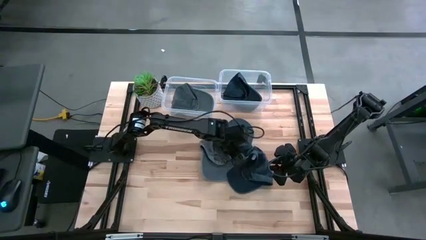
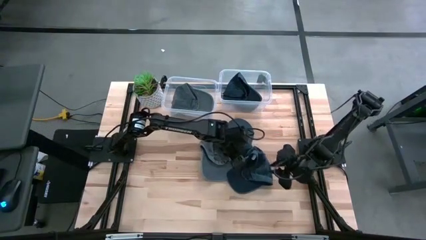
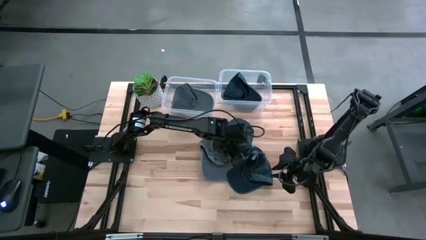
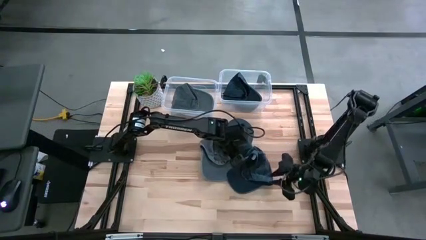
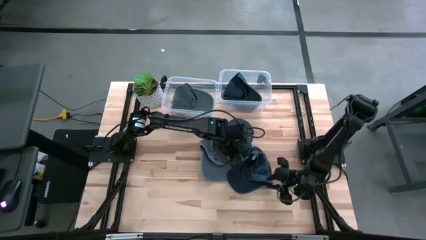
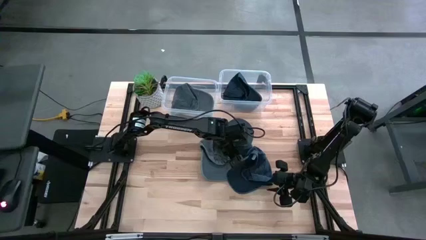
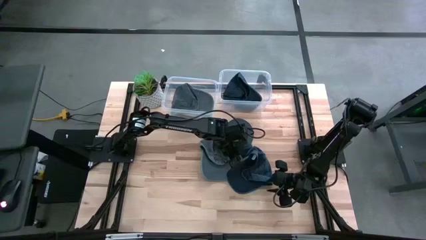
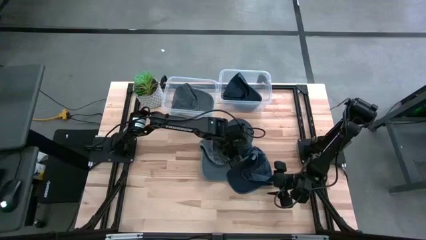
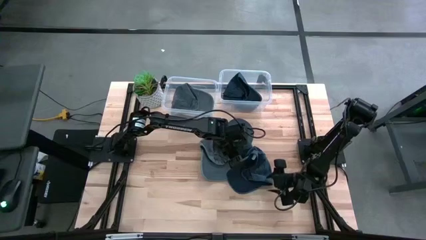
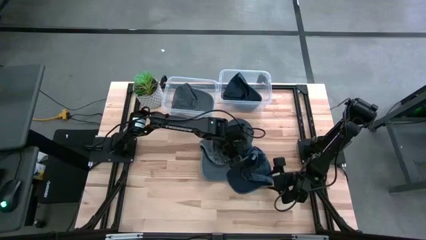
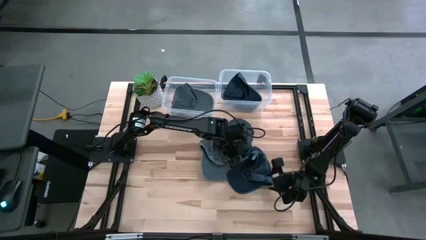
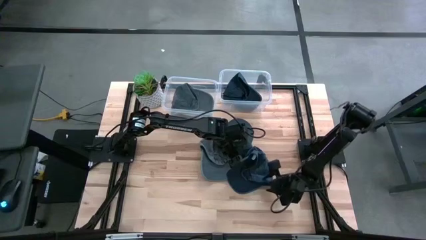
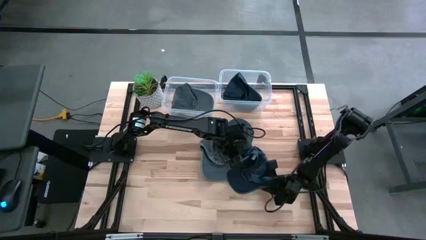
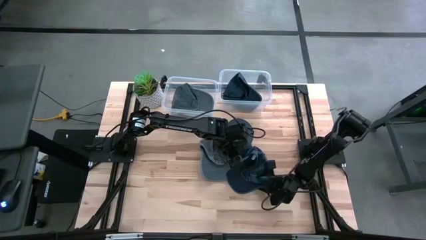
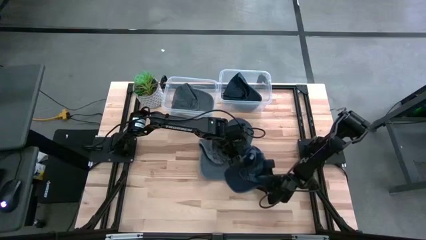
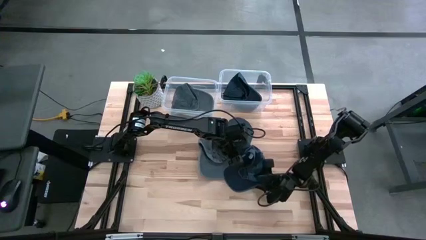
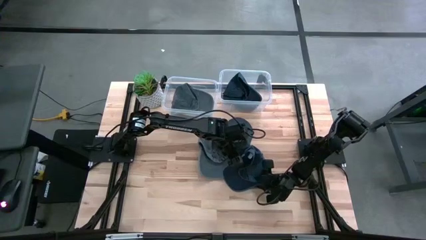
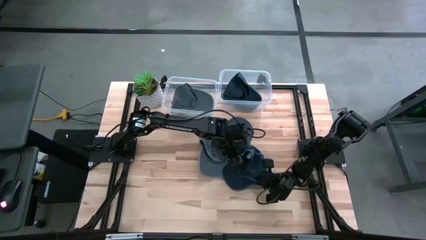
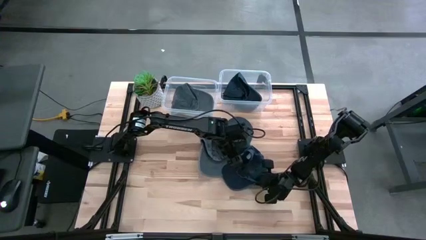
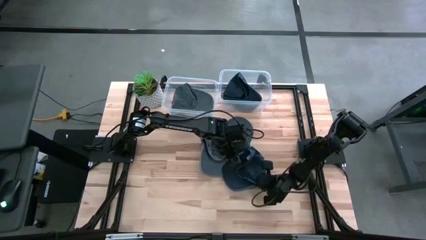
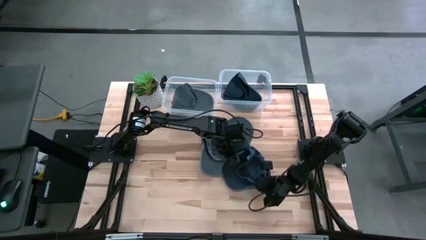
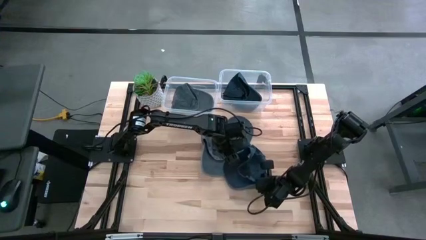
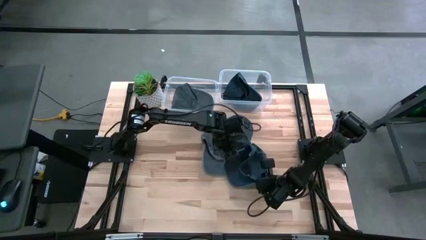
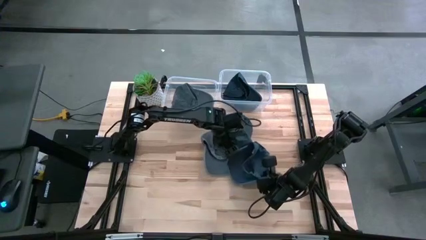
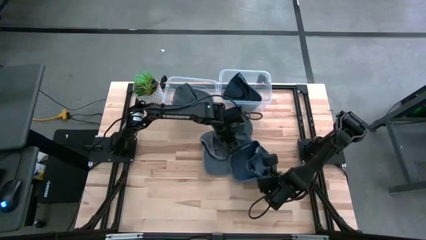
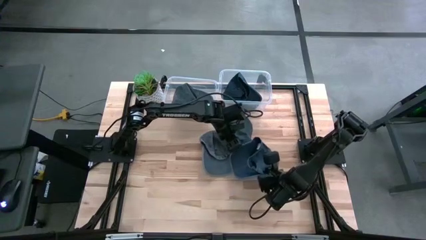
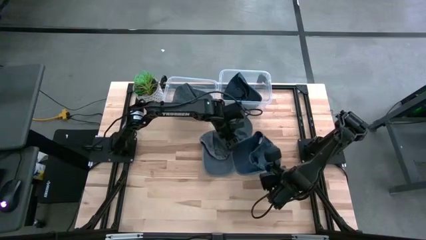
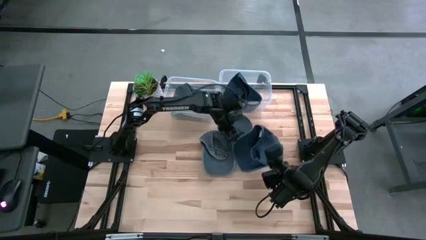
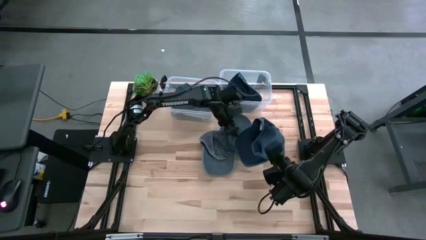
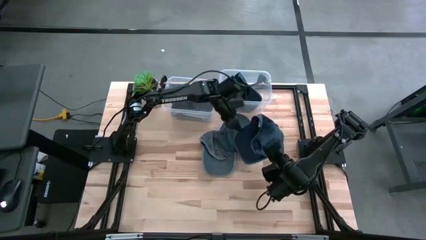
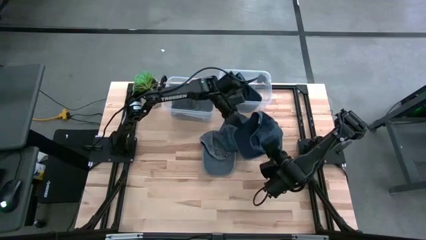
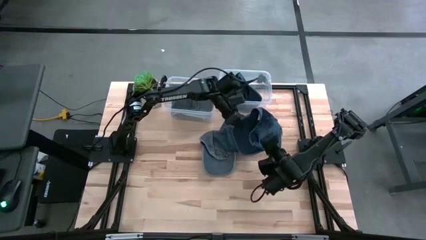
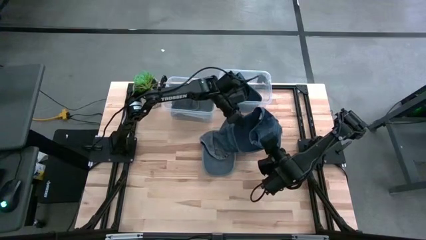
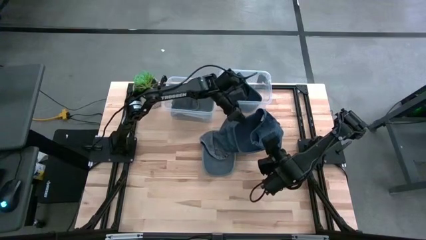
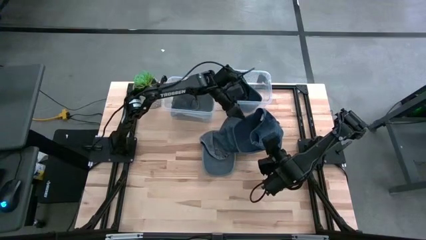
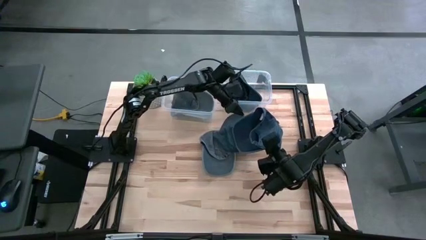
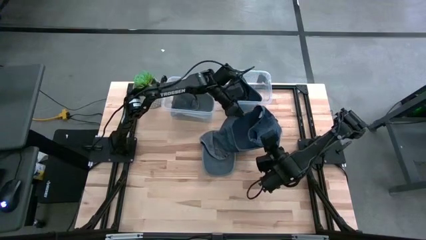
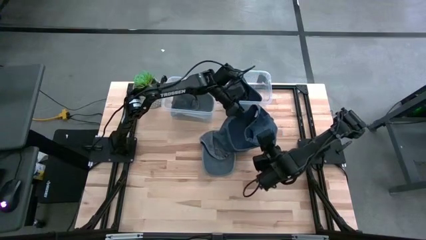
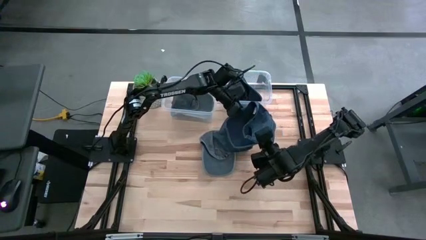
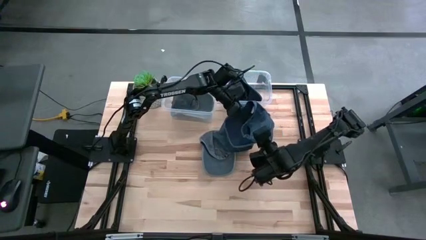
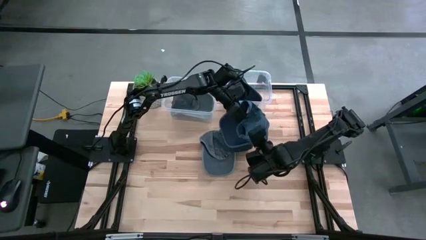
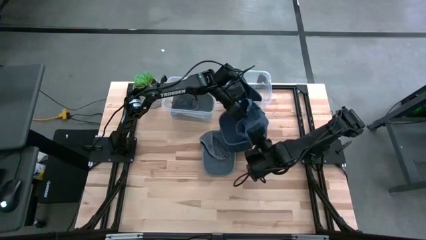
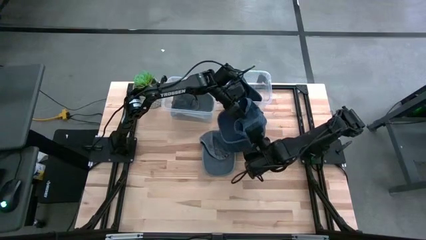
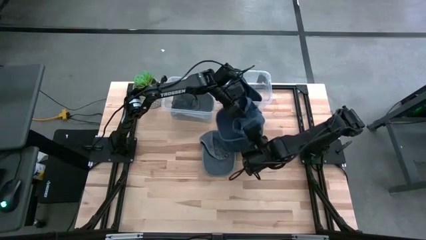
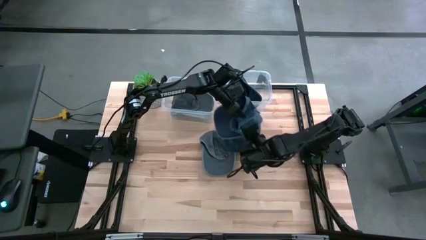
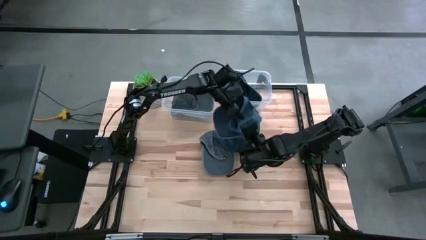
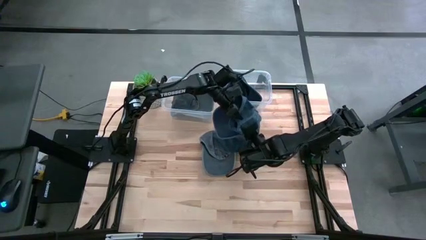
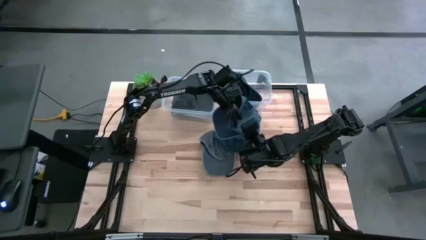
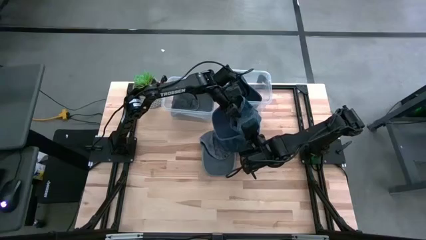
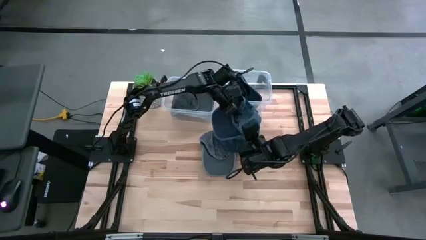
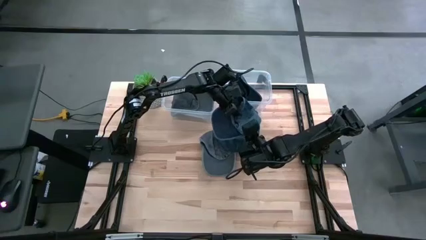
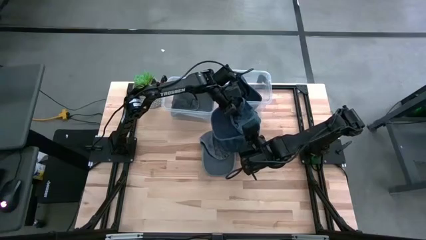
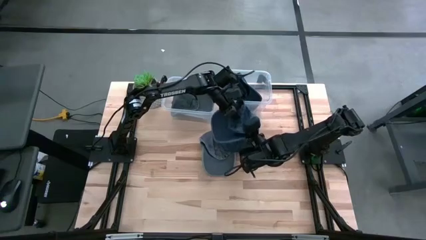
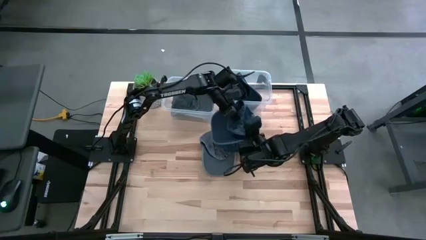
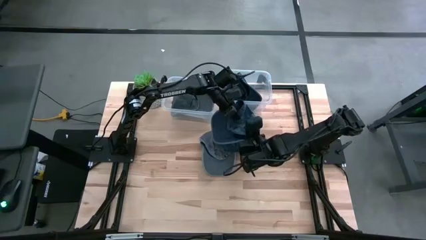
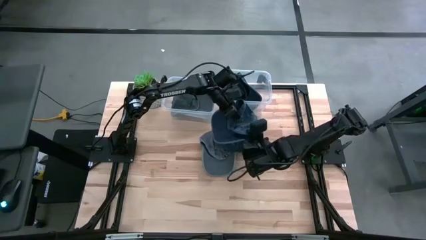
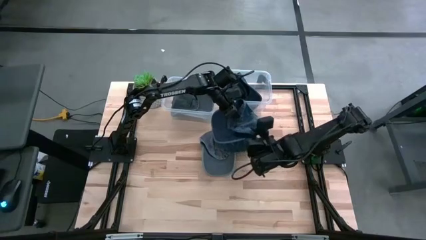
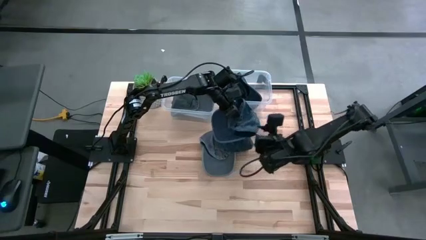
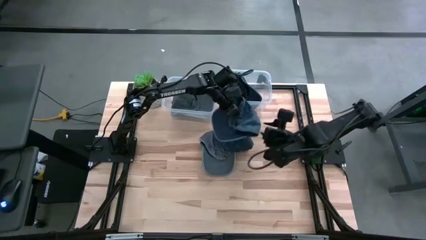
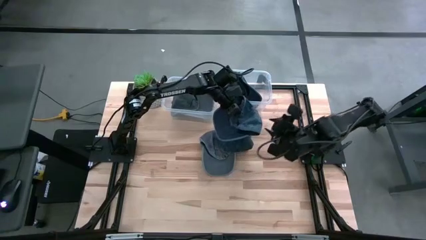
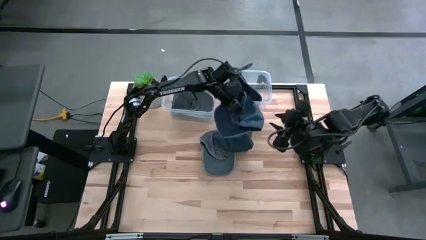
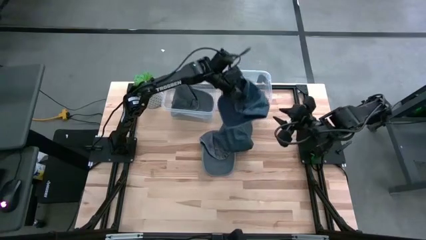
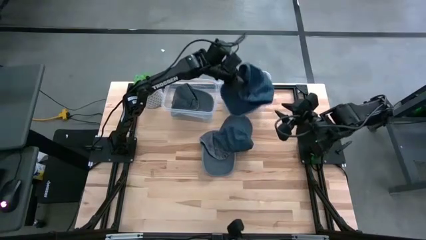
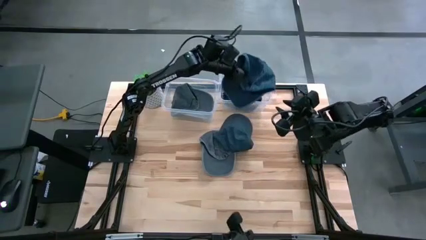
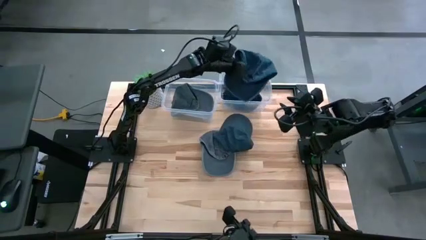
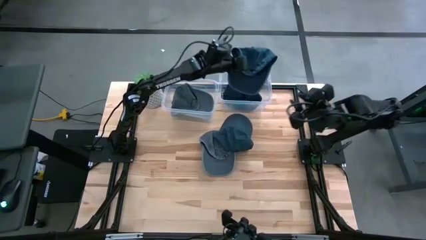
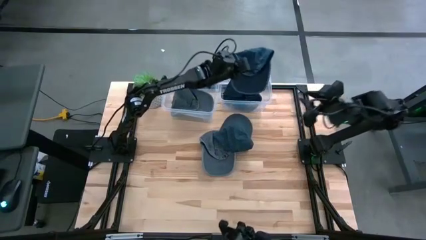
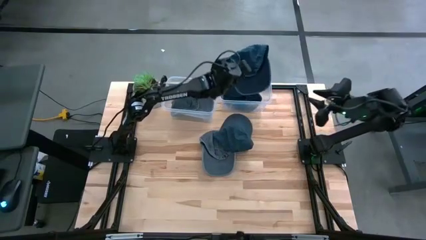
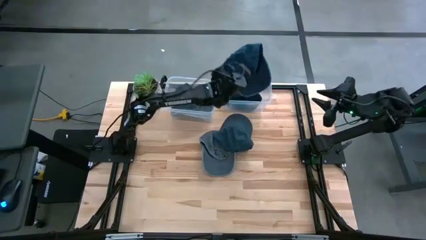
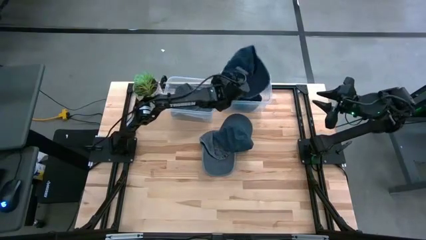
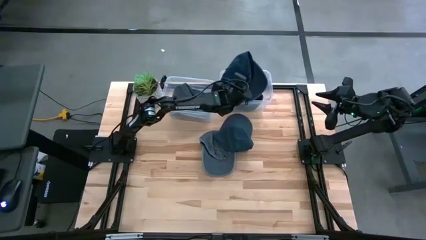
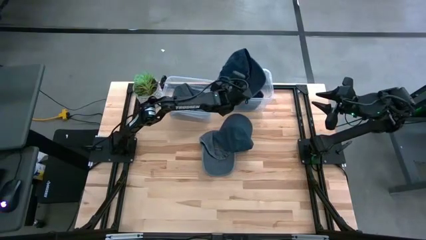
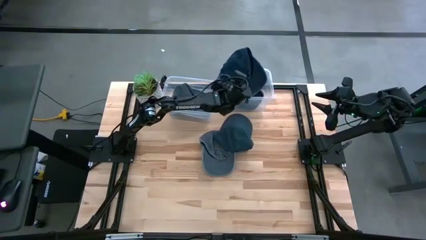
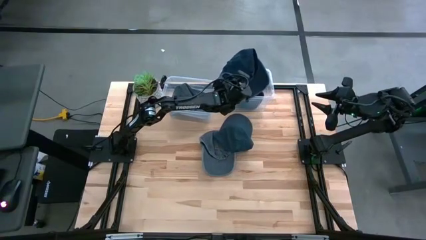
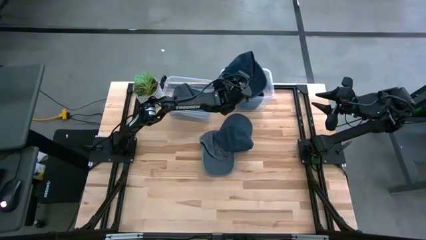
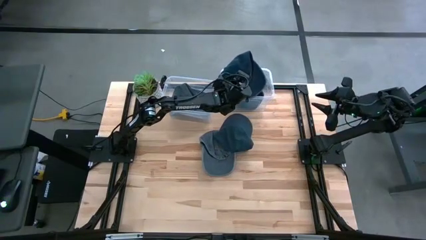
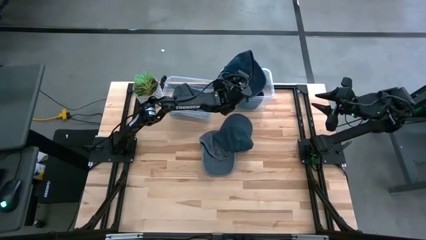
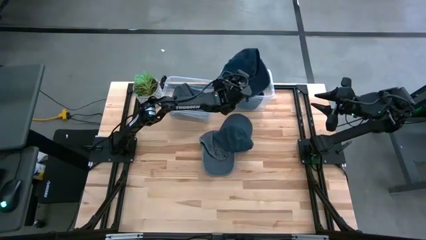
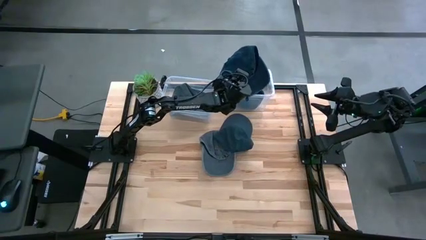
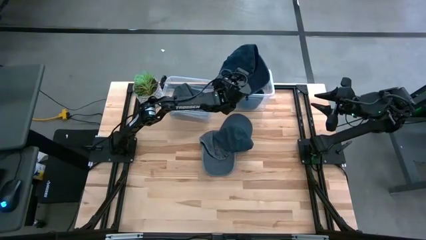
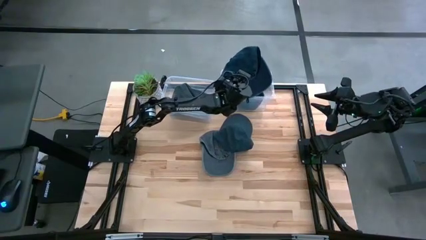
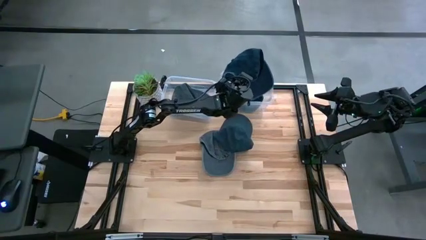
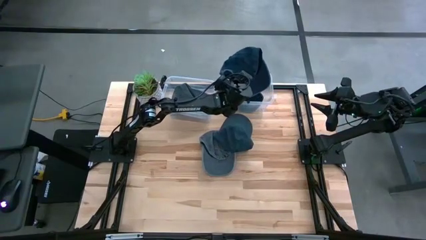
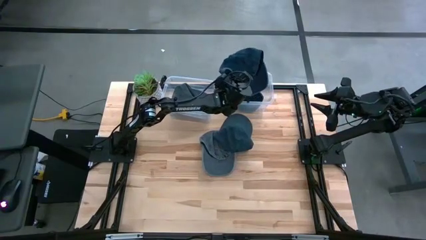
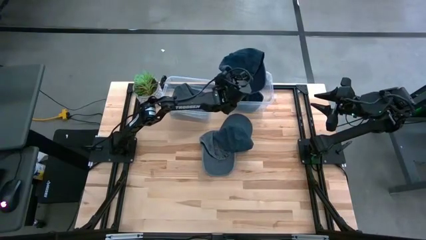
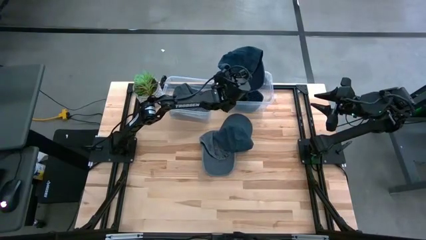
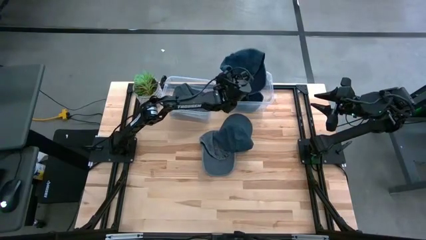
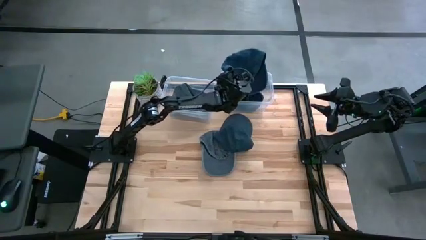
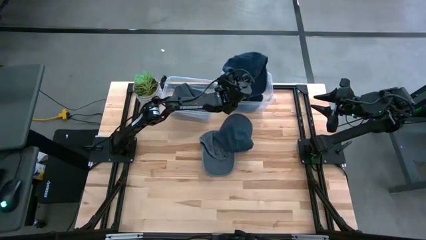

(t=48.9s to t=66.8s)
Task: Pick & Place hat
Put the bottom blue cap into the right transparent bin
